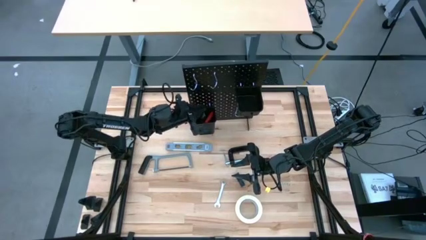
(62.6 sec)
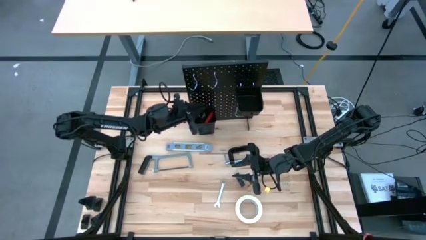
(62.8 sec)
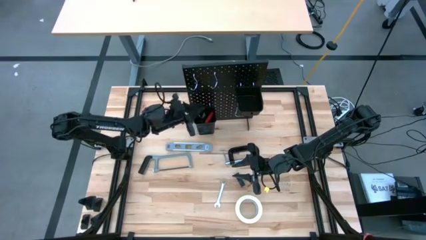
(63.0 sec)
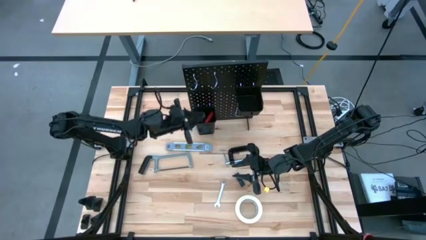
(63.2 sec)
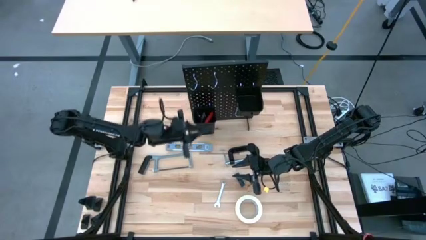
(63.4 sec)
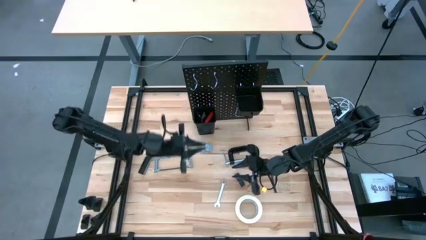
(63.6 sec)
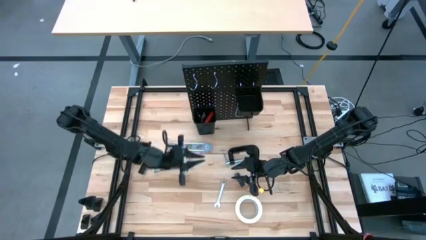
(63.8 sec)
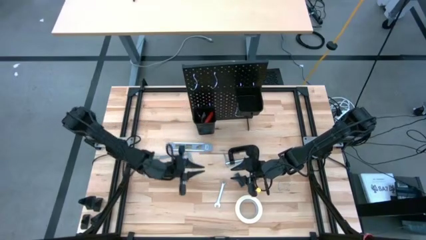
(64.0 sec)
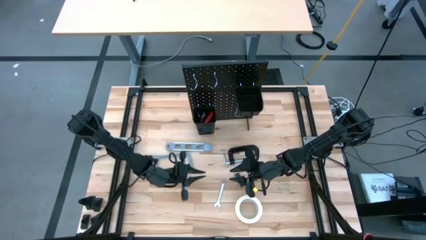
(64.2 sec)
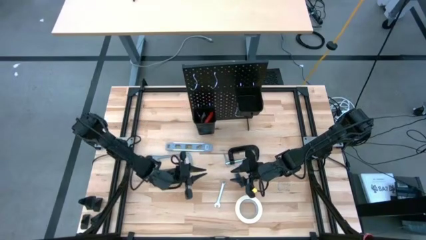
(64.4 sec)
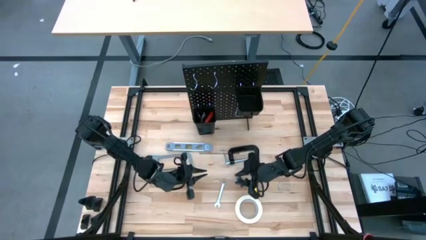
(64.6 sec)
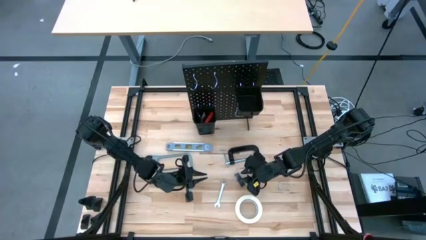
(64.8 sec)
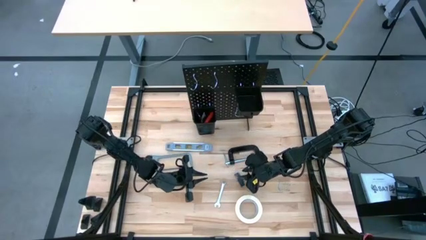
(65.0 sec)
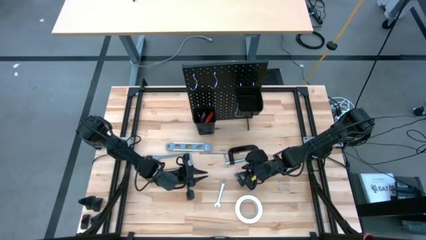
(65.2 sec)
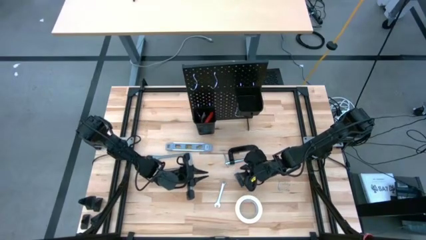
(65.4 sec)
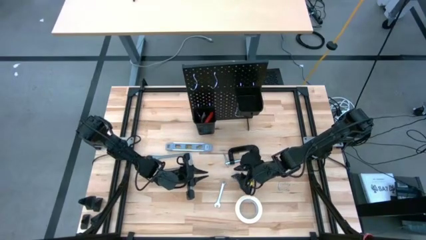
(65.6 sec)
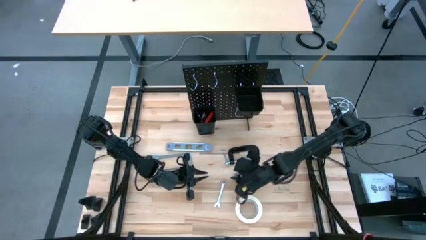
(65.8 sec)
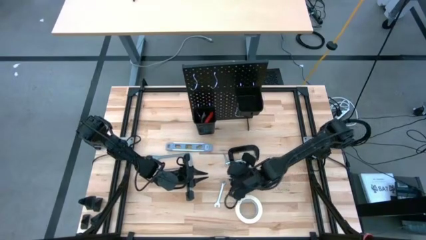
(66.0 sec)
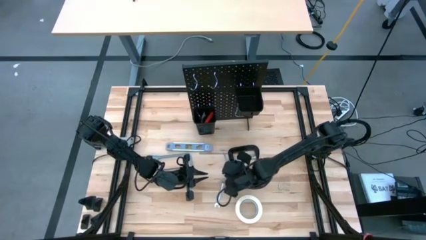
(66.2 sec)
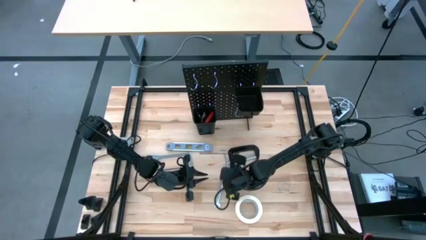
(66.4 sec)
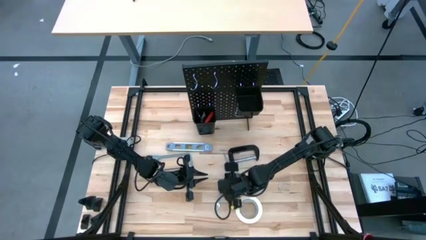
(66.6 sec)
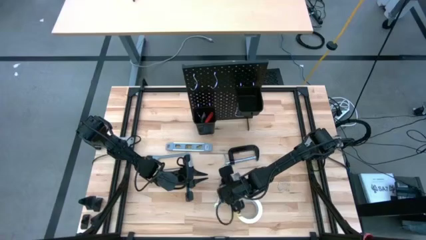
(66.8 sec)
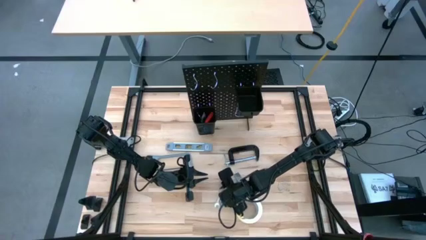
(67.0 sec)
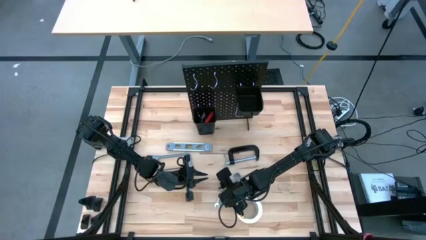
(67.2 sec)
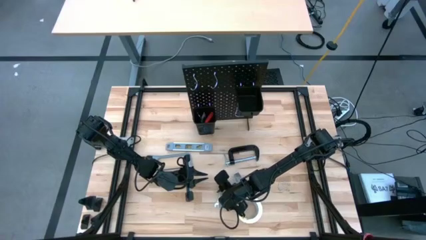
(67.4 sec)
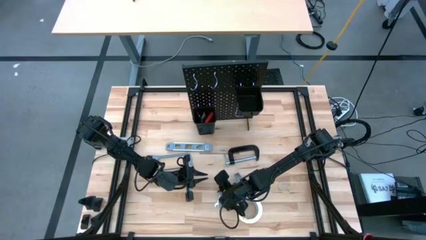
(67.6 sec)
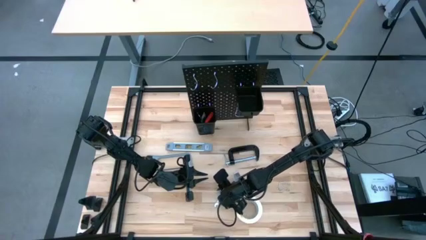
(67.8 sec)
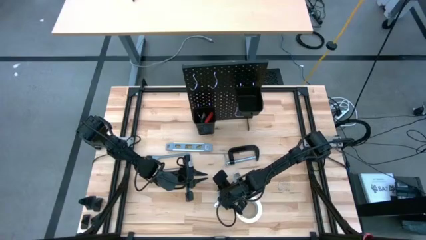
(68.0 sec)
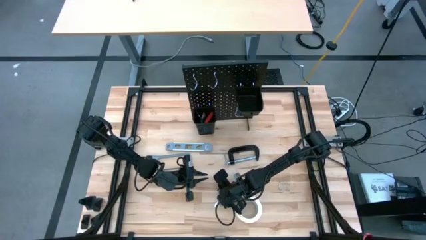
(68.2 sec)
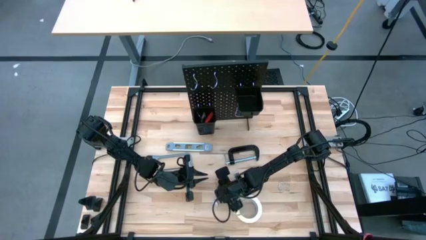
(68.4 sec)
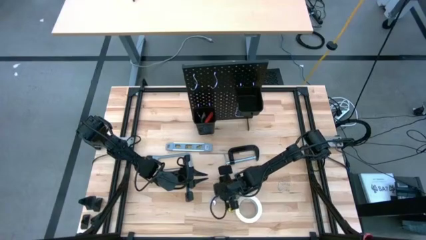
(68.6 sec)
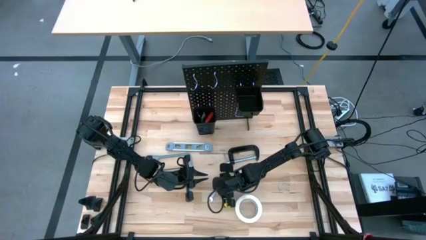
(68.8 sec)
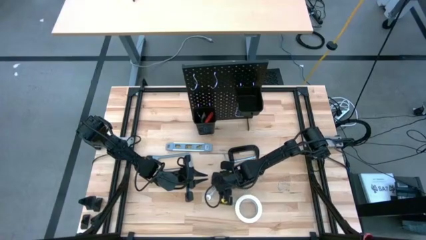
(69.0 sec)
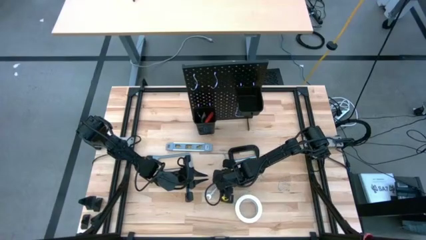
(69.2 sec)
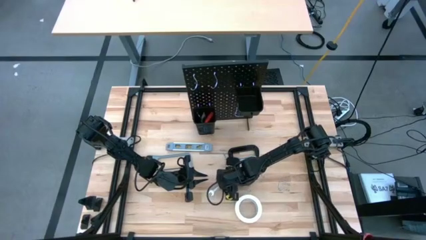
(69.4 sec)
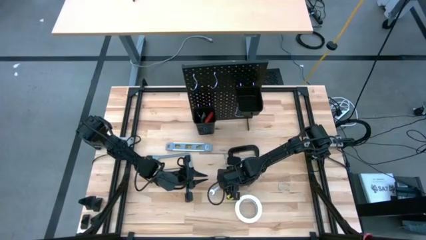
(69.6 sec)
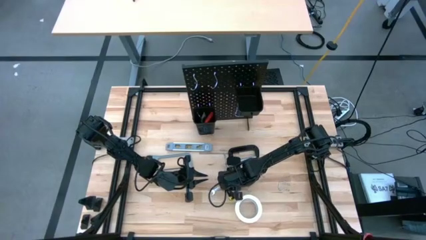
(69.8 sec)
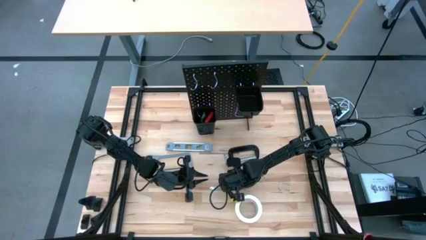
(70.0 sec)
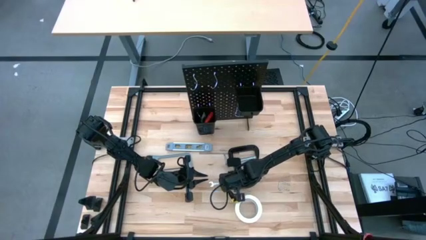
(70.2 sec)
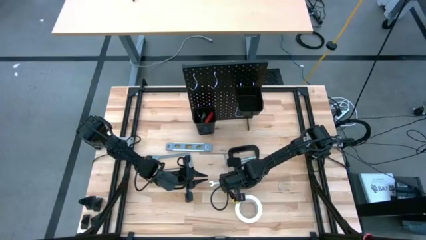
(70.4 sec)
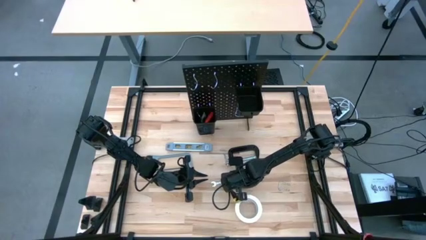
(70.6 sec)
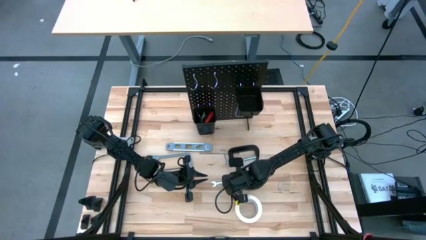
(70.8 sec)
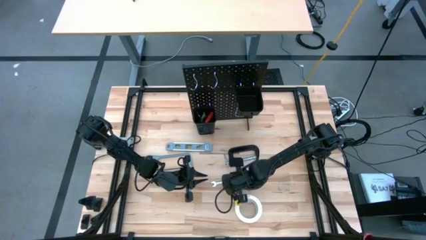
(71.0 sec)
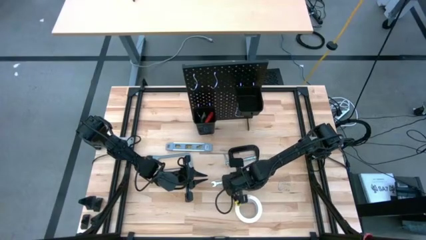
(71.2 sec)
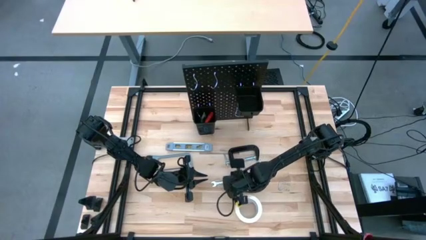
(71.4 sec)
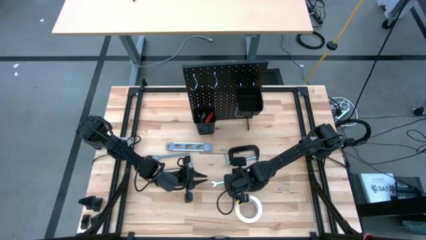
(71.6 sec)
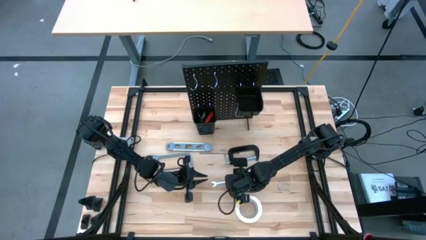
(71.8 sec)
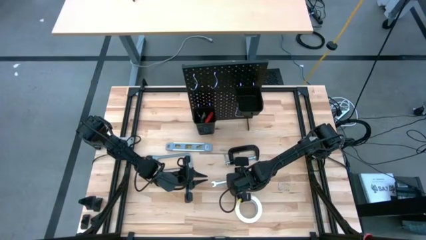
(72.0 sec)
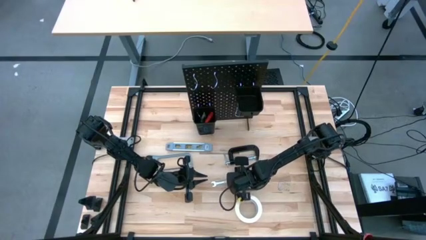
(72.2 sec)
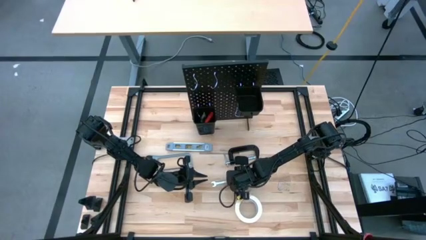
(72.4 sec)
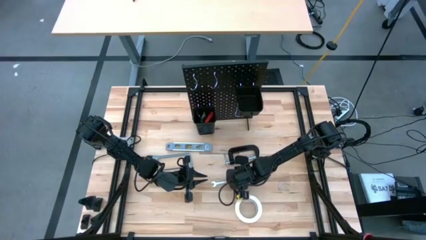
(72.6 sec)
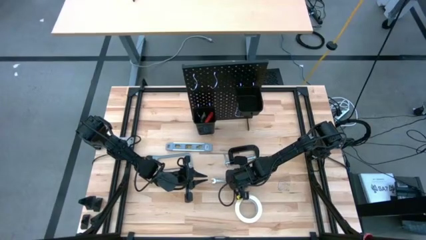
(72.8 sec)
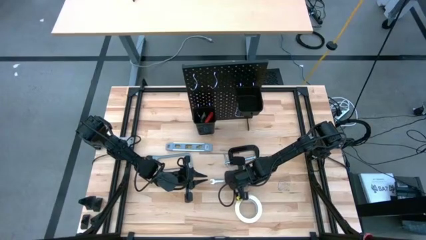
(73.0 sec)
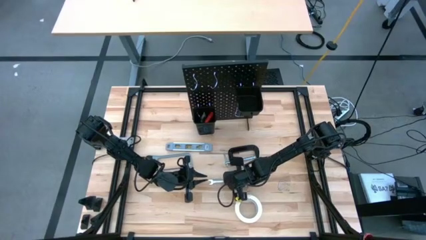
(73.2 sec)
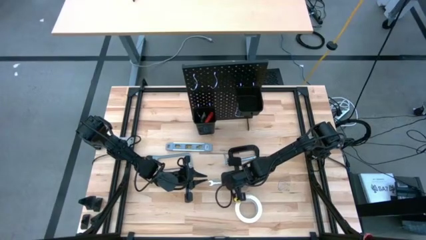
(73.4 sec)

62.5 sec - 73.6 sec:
Task: Hang tools onto peg board
Put the wrench into the bottom black bin on the pegboard
